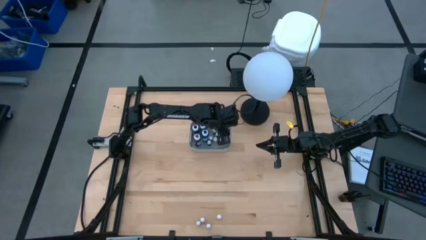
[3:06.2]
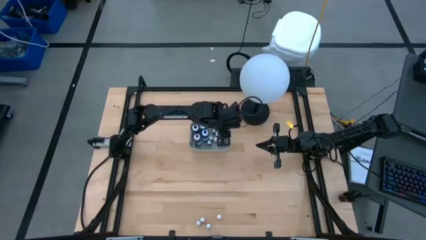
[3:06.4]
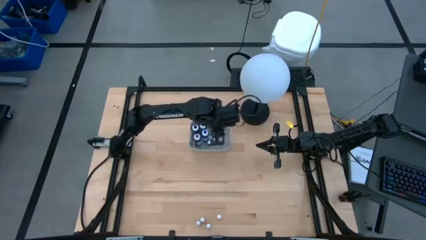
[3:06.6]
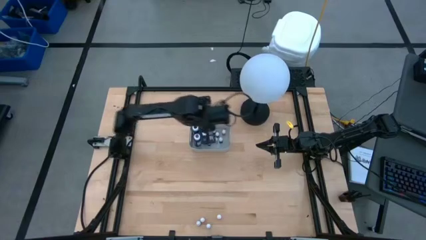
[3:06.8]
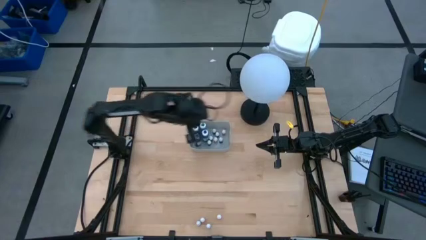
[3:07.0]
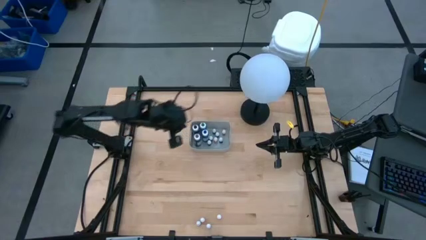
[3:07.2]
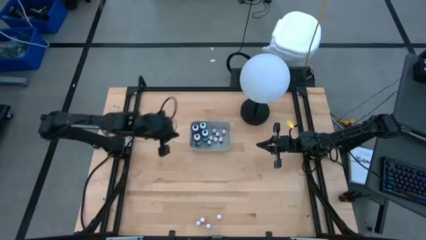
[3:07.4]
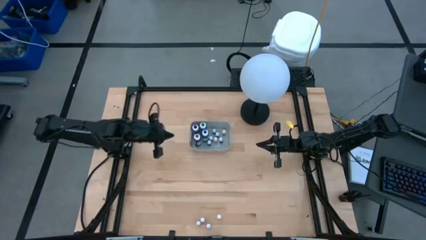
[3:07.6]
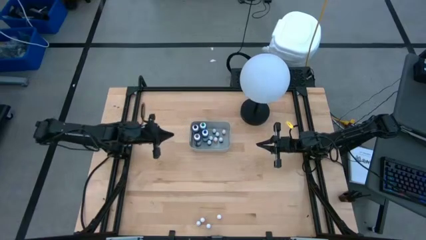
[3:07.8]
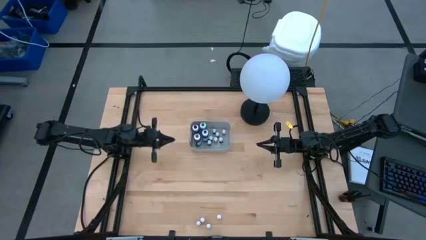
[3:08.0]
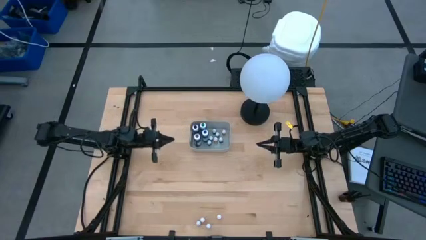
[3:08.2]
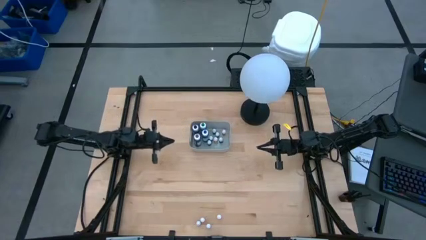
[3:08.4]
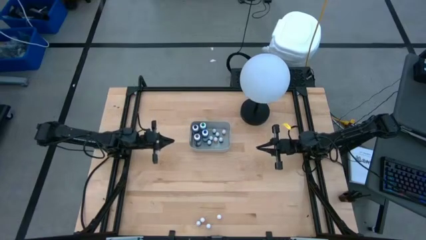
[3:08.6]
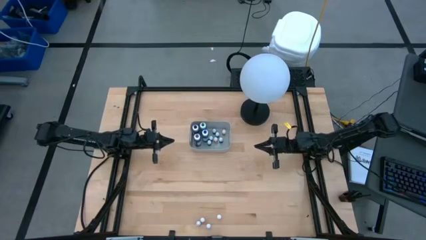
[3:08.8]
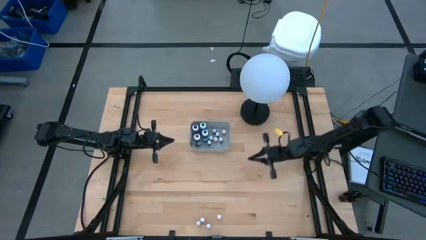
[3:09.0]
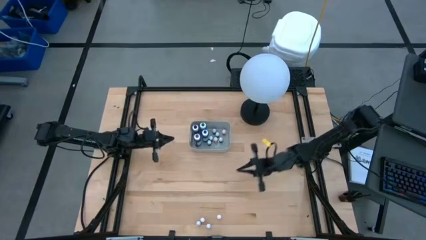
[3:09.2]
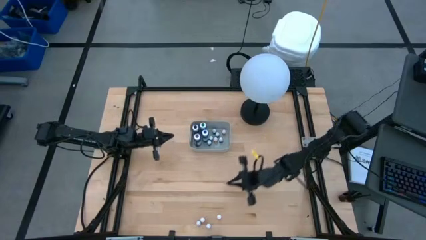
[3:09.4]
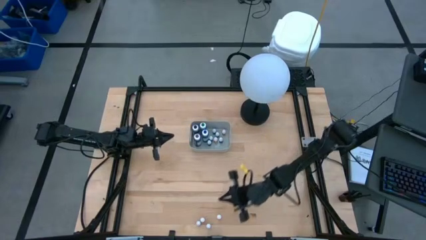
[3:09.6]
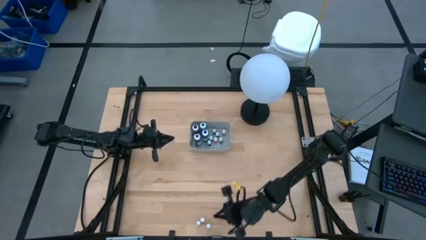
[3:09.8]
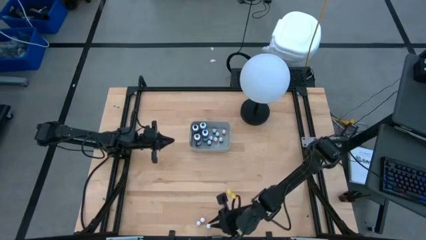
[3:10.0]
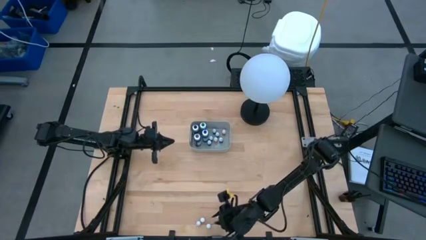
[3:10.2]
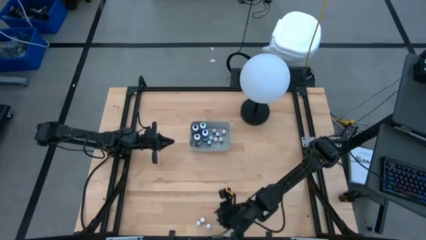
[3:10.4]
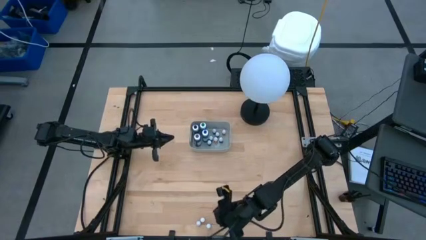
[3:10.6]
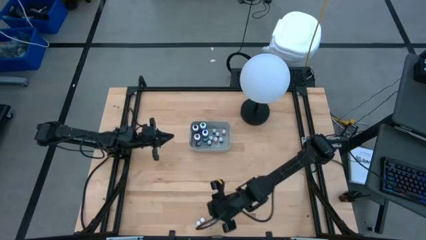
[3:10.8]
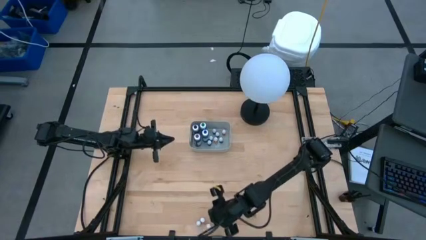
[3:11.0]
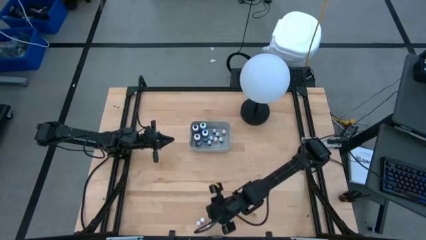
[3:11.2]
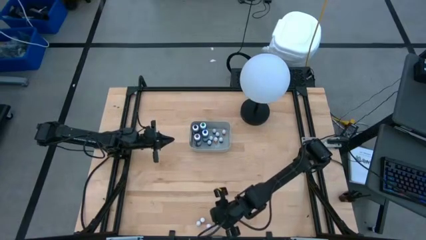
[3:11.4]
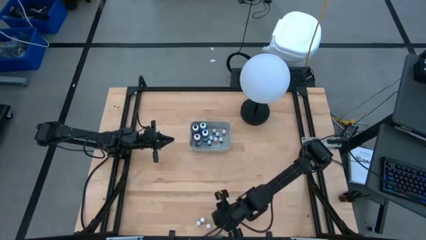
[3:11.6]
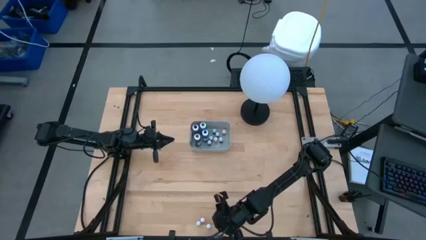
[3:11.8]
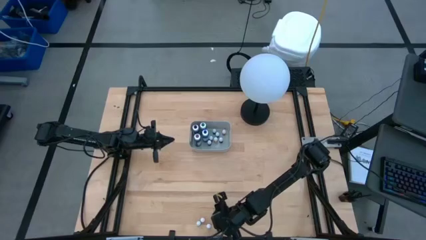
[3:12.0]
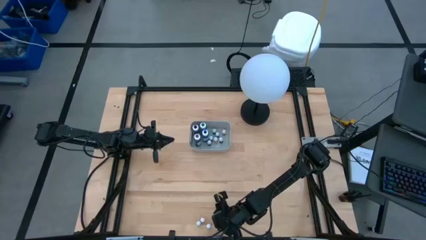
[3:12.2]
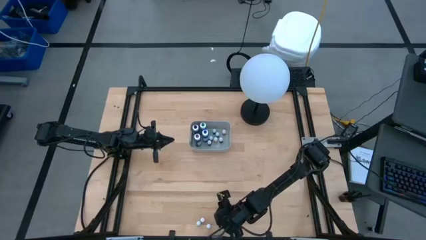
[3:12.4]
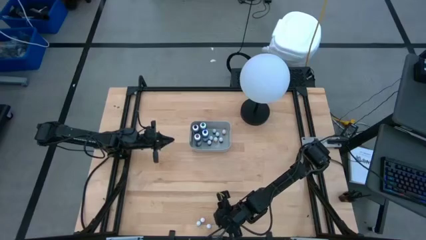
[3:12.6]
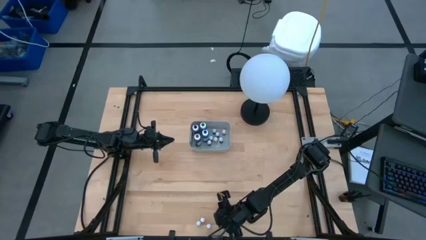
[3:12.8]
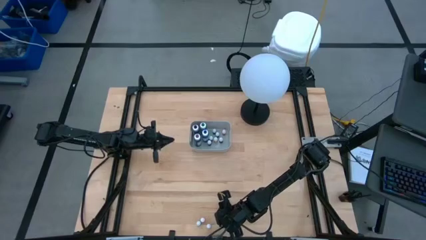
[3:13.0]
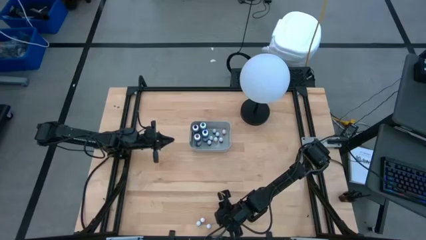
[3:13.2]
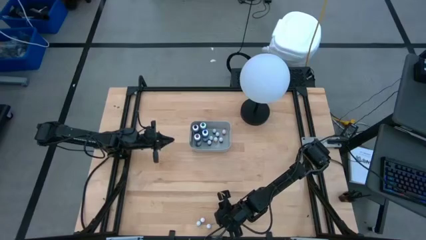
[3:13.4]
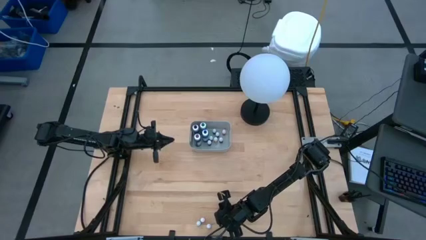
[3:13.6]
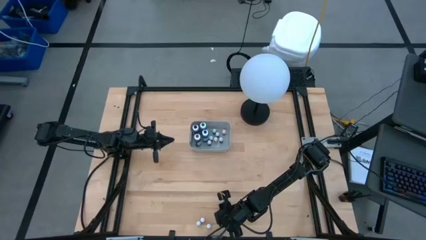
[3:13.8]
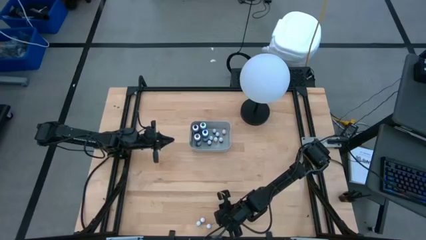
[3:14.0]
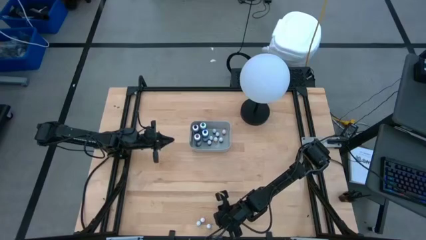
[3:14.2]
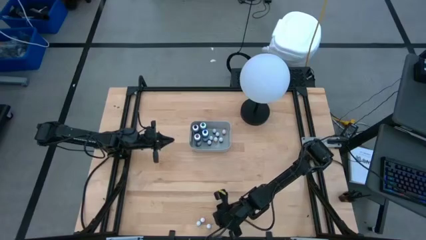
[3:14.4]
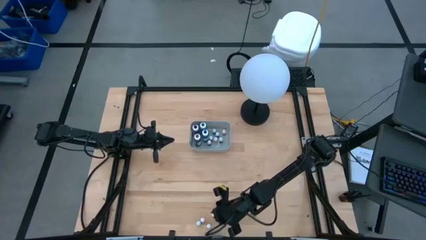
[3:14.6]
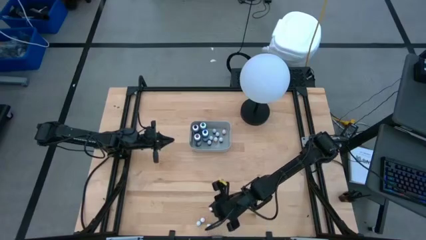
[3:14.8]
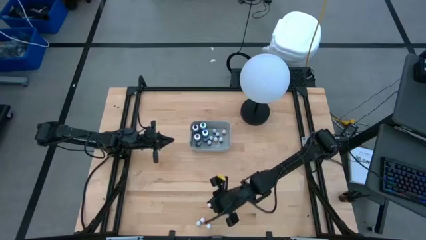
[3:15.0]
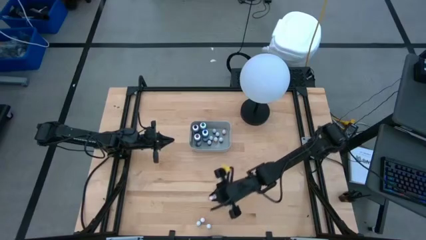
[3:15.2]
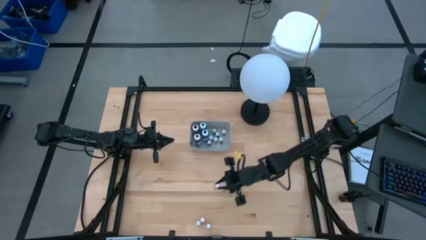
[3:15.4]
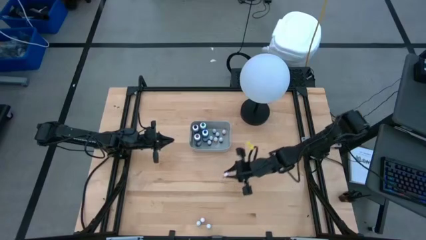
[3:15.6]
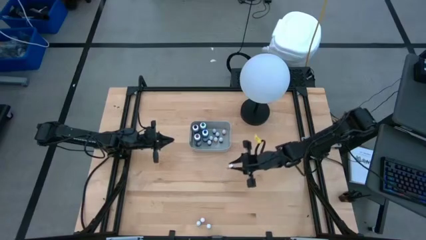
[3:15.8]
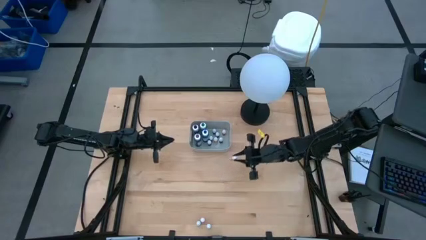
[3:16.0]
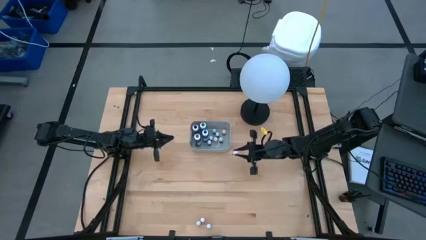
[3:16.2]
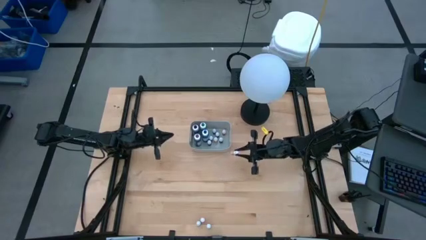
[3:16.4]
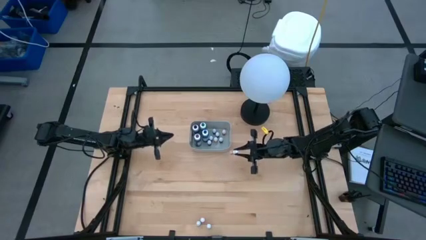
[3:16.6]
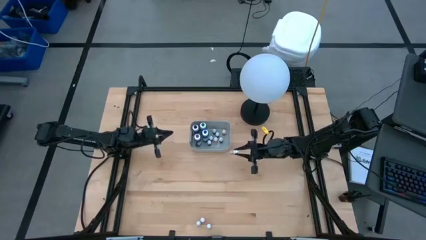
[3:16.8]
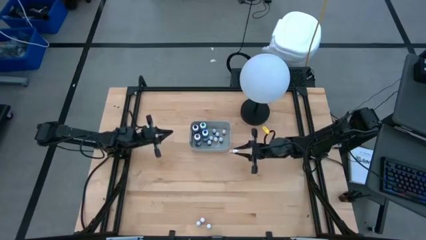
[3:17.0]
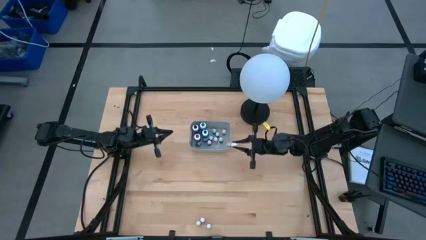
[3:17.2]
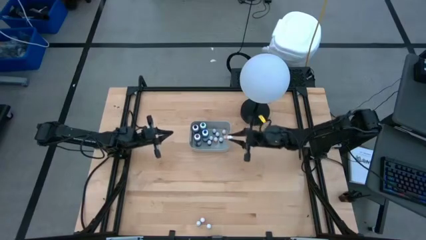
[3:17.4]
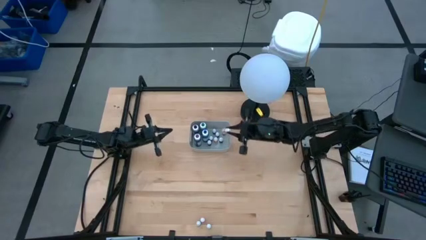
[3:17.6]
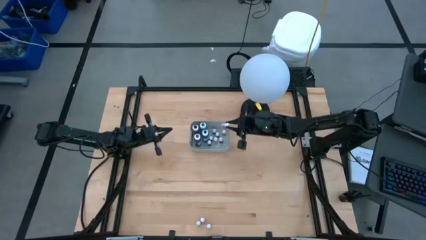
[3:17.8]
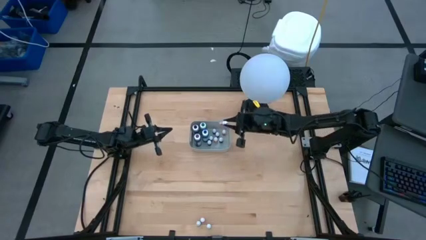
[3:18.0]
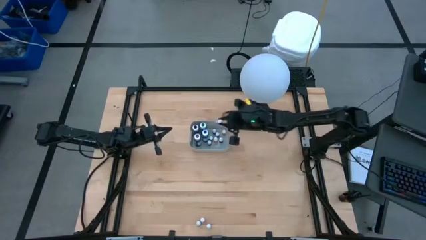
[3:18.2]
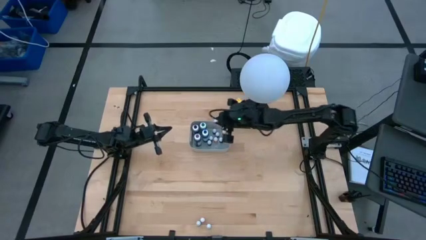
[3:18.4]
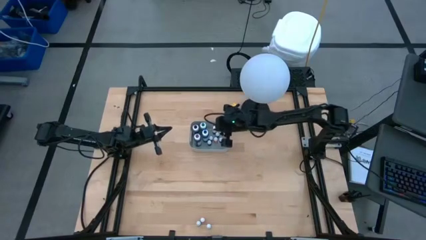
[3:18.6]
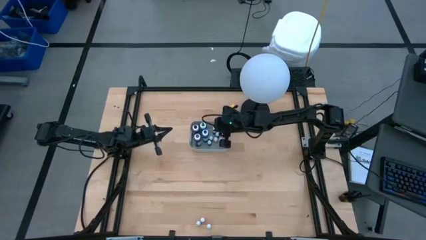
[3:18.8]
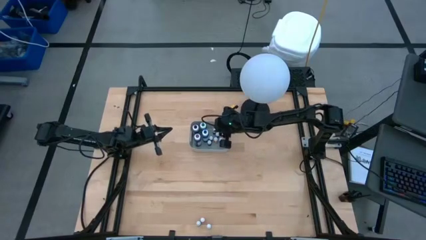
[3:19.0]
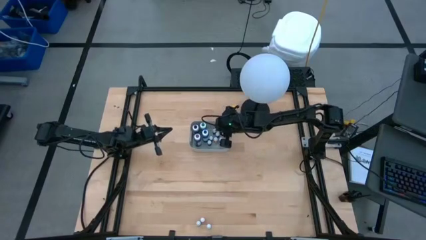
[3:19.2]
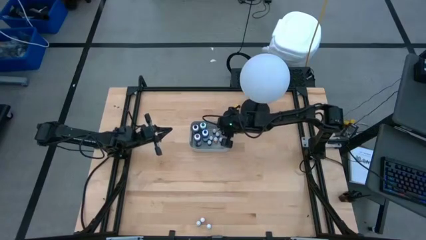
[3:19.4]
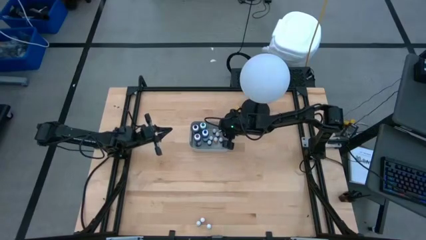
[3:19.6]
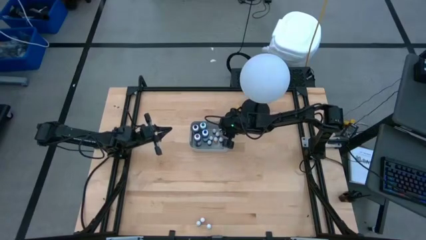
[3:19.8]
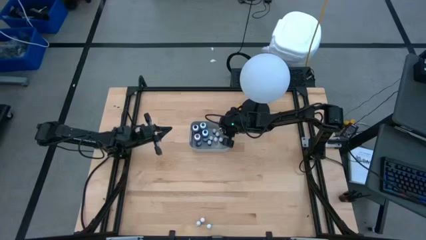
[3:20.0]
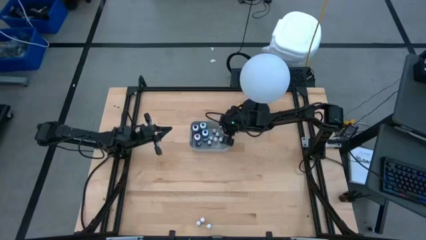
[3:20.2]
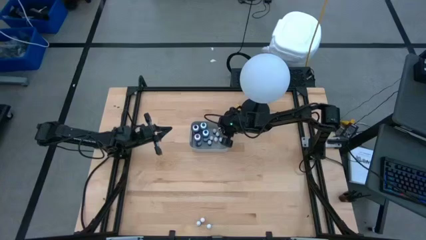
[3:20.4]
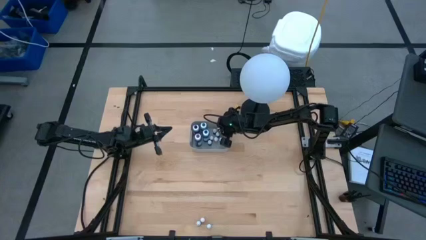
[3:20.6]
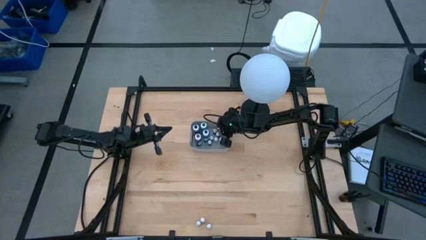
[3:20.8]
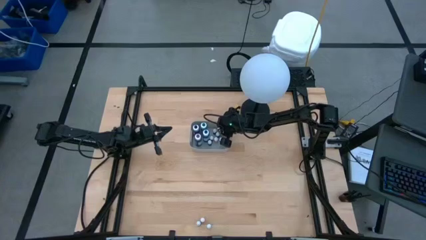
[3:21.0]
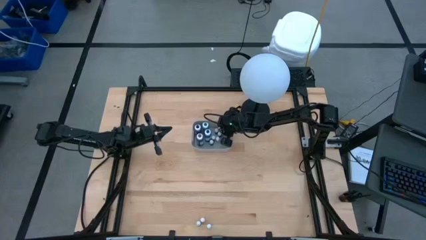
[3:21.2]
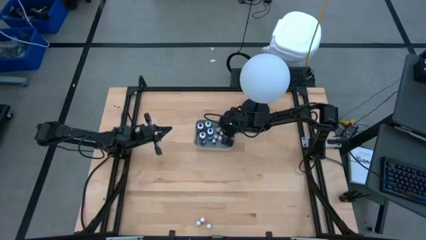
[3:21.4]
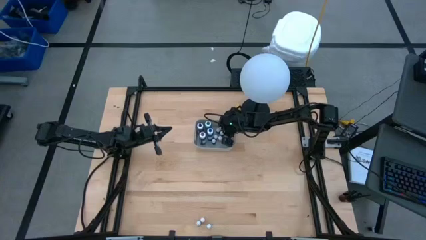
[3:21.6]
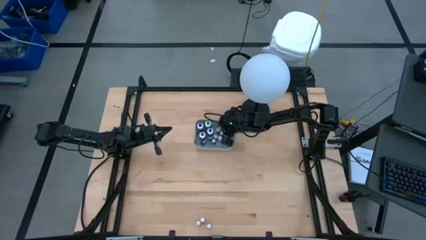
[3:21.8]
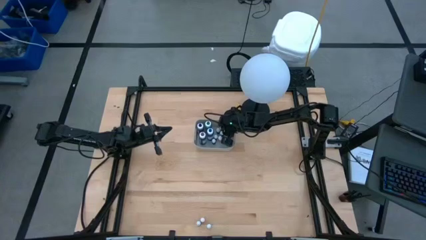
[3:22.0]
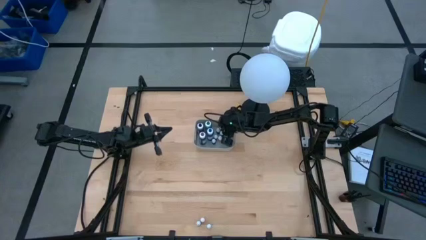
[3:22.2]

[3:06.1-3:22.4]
Task: Pick & Place food coloring
Put the small yellow food coloring bottle into the gray bin
